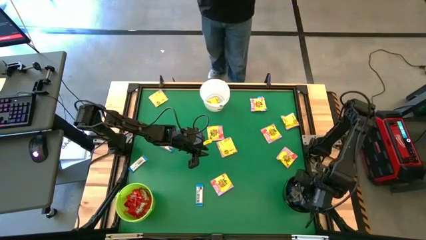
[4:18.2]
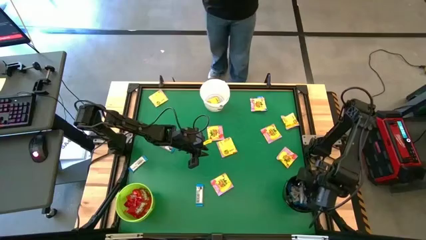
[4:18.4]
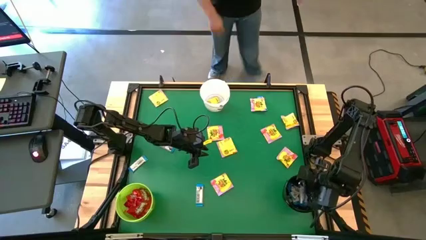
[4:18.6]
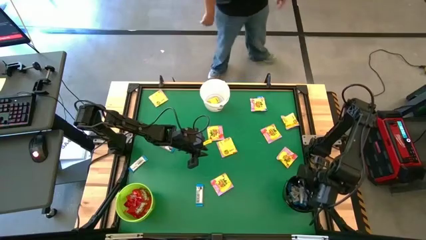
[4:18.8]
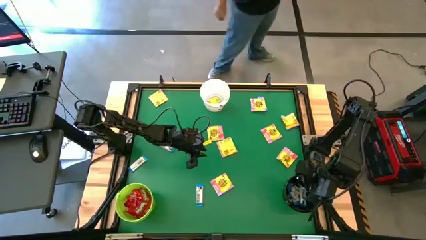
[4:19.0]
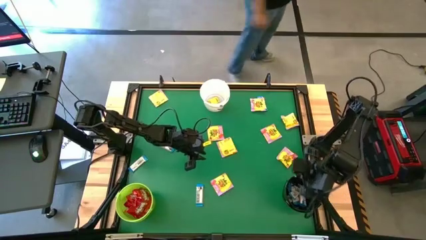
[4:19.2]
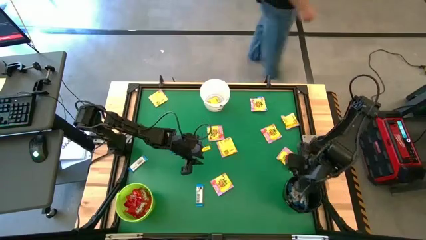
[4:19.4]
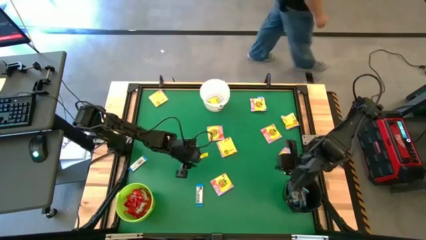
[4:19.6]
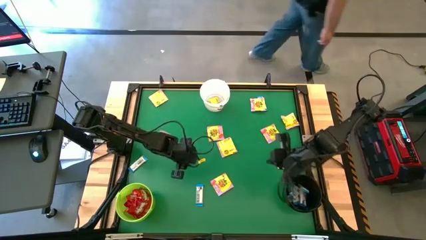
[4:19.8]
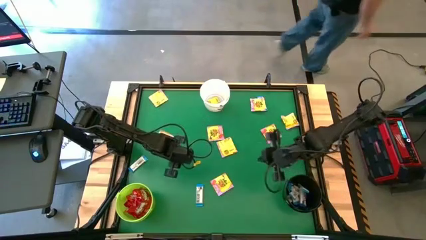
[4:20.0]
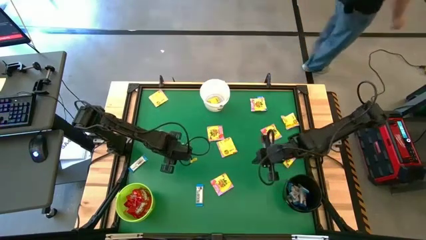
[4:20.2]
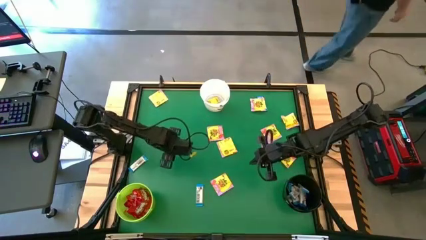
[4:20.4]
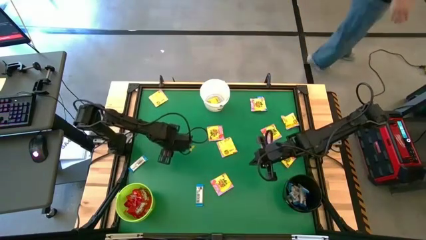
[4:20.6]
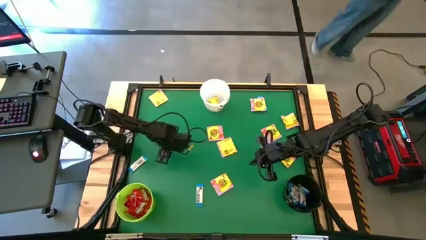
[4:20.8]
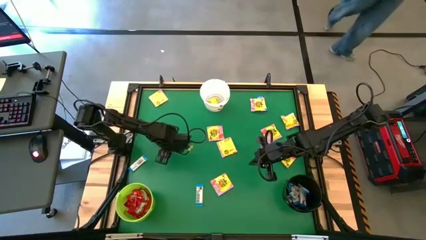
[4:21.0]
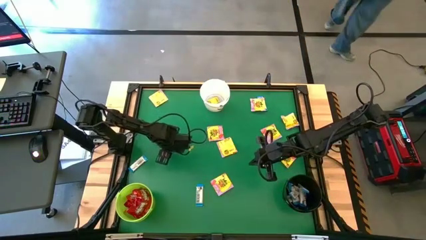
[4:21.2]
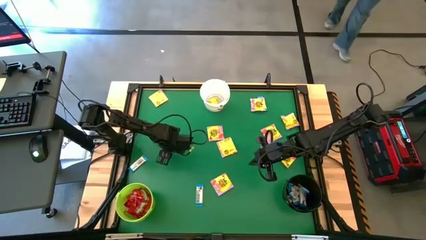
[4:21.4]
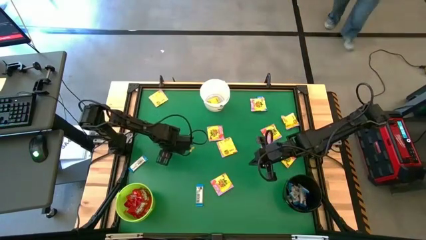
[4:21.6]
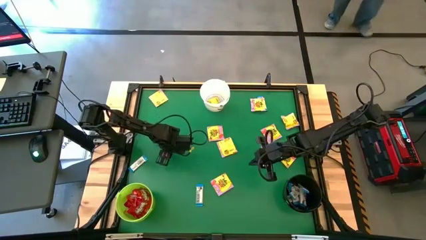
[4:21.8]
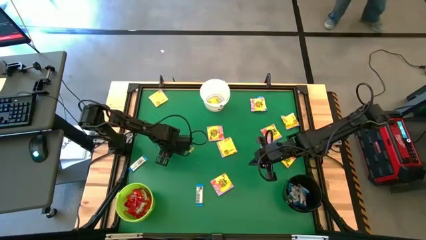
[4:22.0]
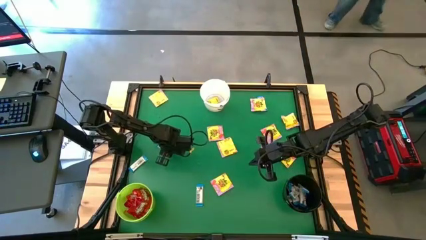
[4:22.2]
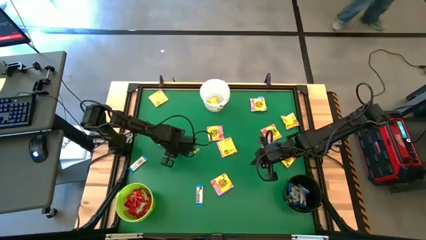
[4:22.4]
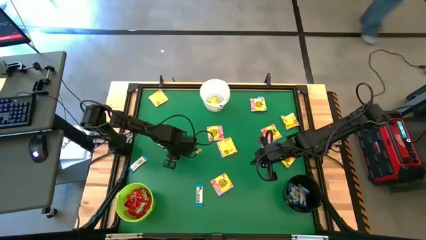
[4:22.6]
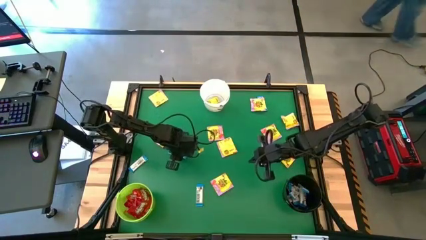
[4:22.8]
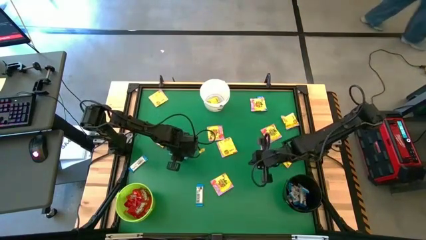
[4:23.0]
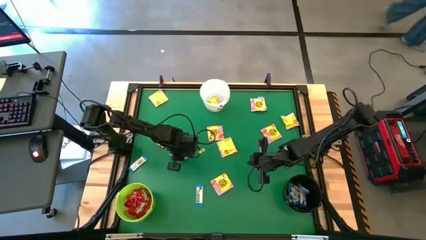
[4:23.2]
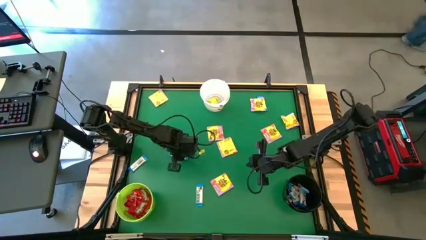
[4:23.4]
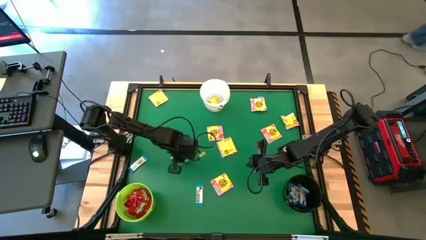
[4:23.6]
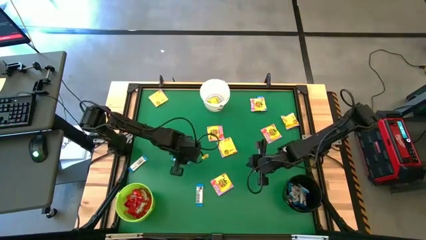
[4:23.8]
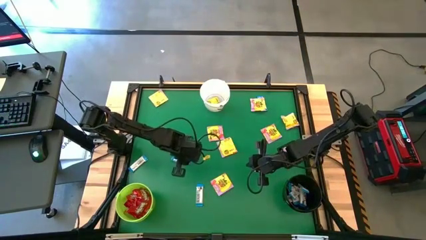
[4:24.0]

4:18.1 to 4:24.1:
Task: Sort candy by brand, put in halloween buckets
Put the white candy into the black bucket

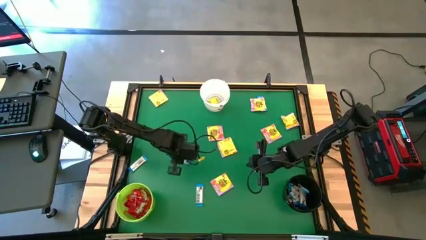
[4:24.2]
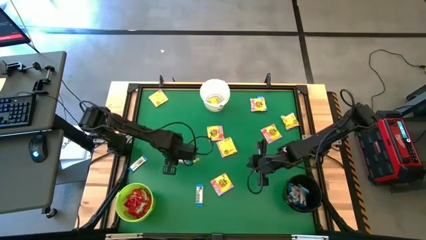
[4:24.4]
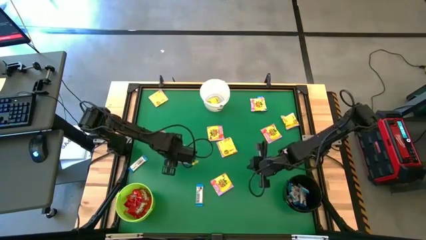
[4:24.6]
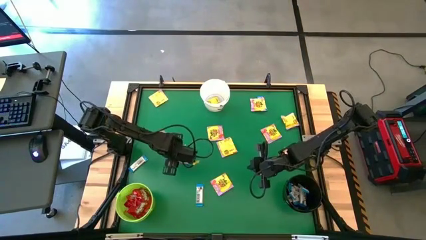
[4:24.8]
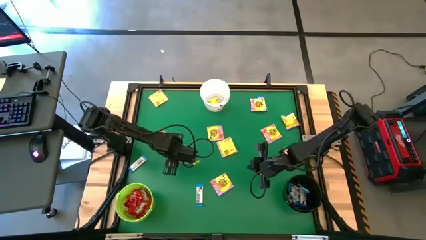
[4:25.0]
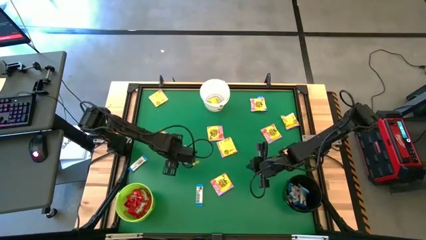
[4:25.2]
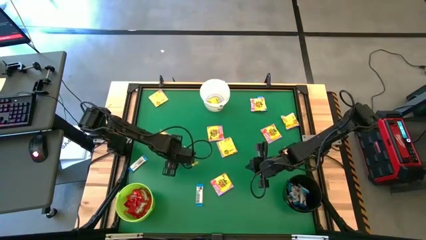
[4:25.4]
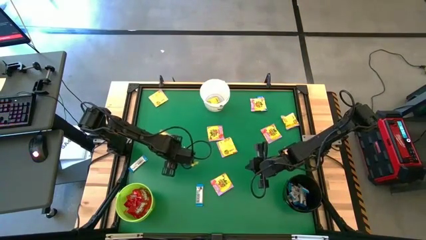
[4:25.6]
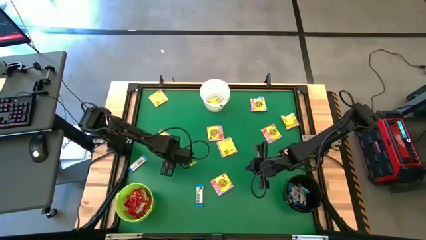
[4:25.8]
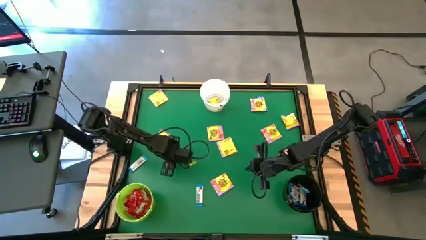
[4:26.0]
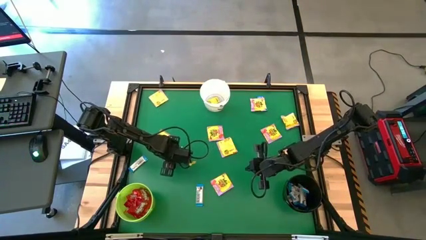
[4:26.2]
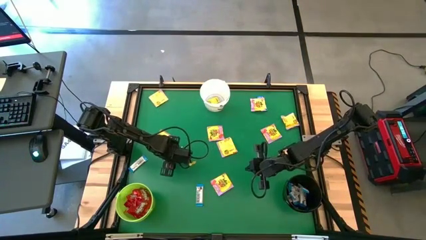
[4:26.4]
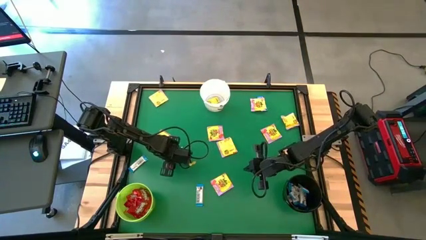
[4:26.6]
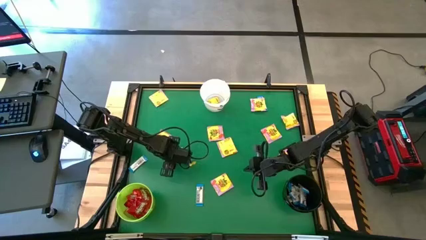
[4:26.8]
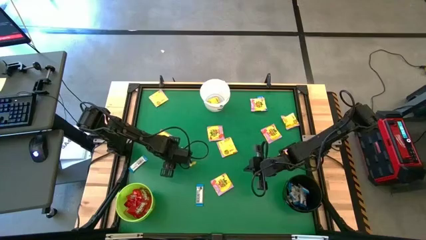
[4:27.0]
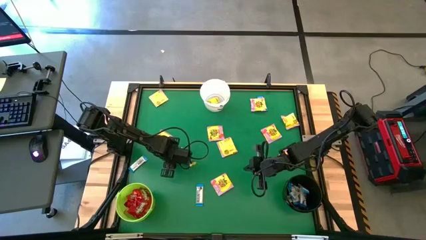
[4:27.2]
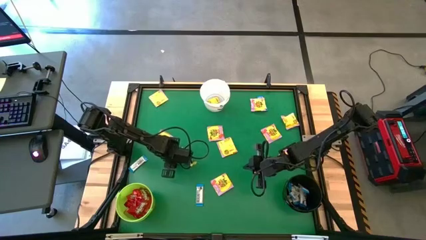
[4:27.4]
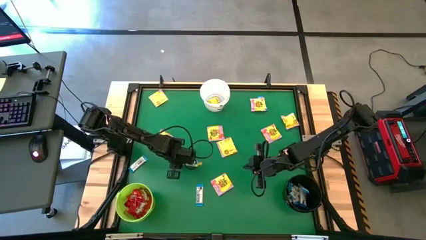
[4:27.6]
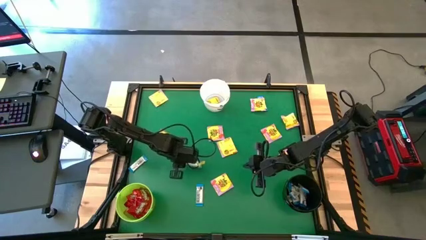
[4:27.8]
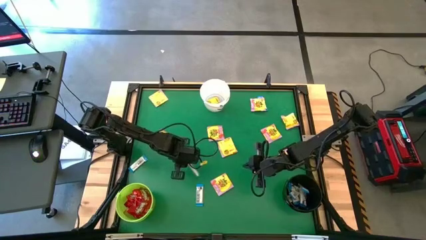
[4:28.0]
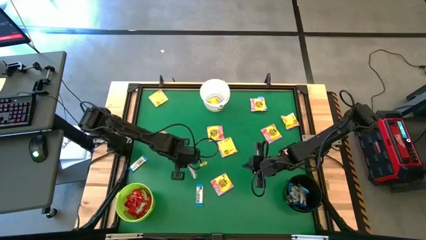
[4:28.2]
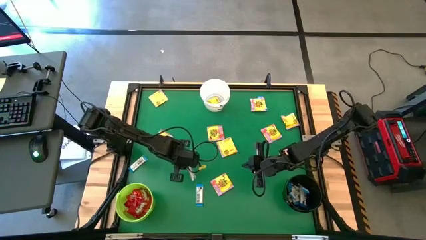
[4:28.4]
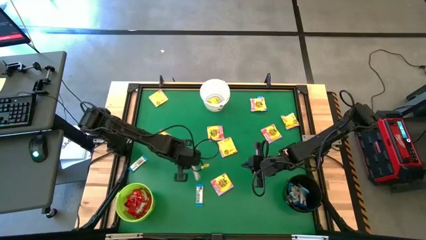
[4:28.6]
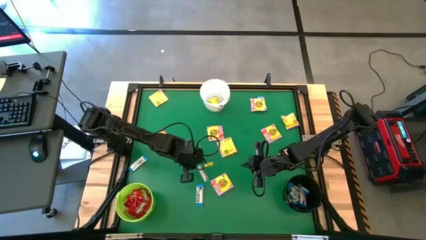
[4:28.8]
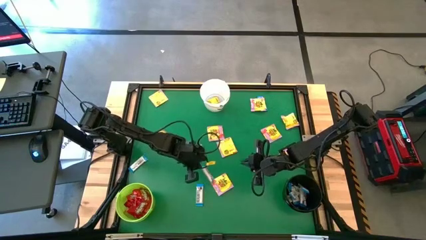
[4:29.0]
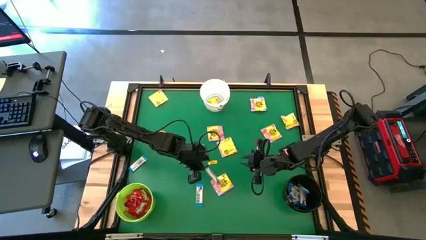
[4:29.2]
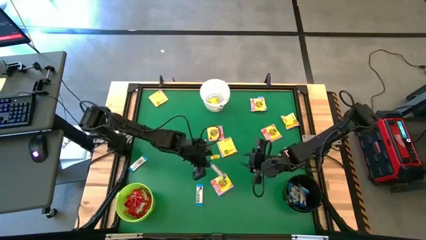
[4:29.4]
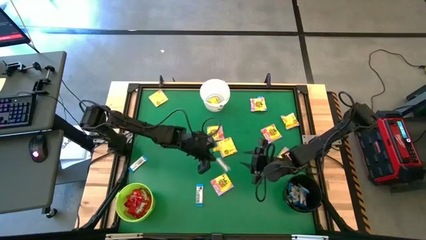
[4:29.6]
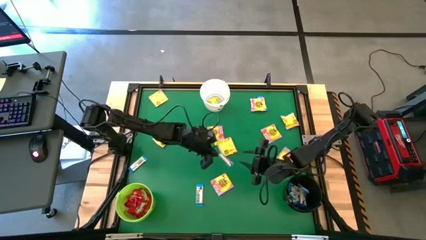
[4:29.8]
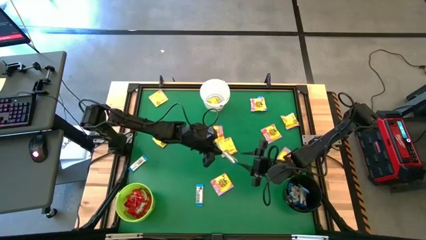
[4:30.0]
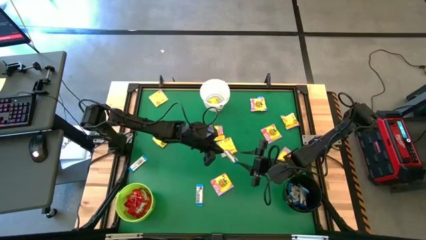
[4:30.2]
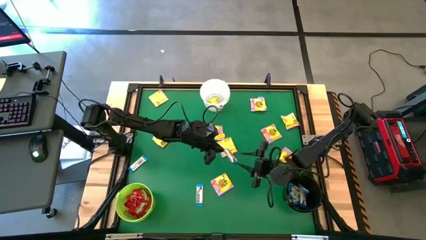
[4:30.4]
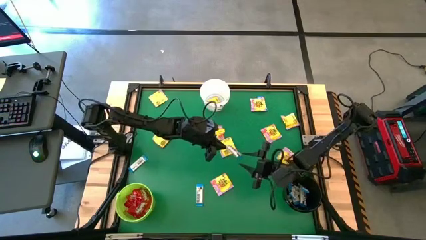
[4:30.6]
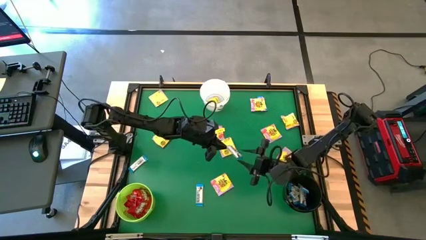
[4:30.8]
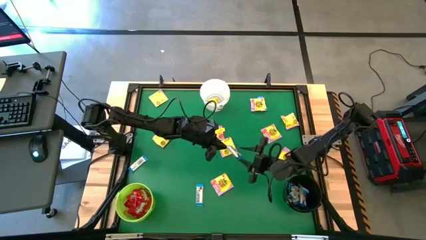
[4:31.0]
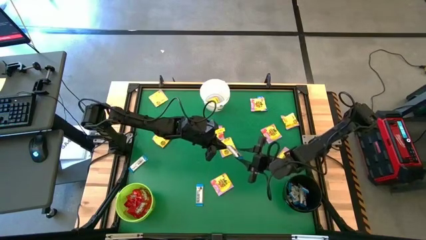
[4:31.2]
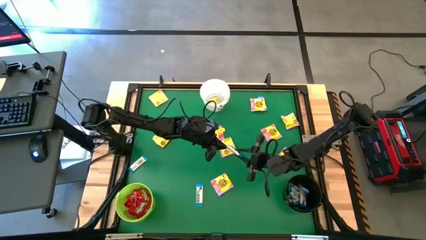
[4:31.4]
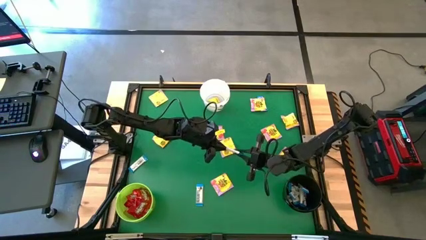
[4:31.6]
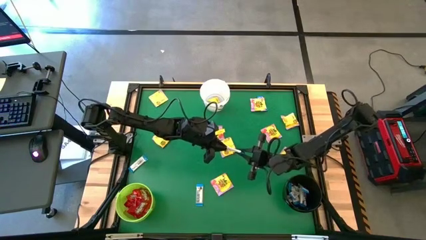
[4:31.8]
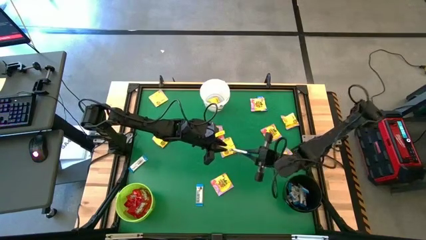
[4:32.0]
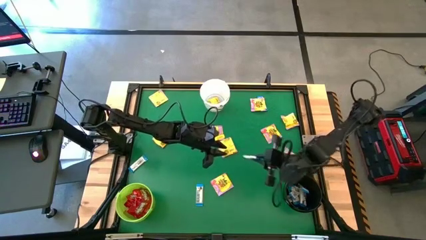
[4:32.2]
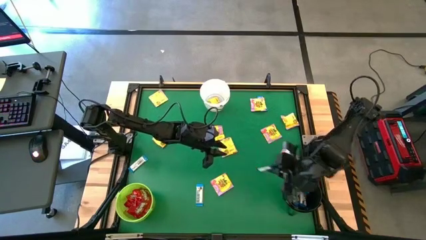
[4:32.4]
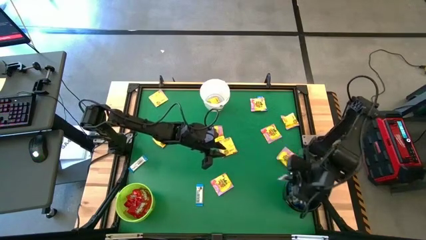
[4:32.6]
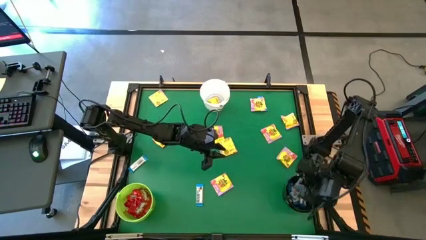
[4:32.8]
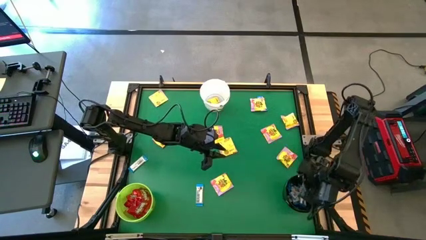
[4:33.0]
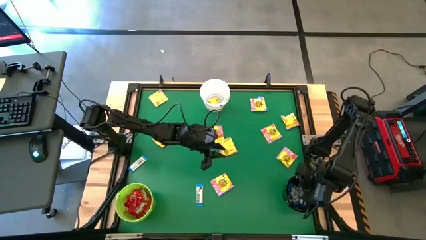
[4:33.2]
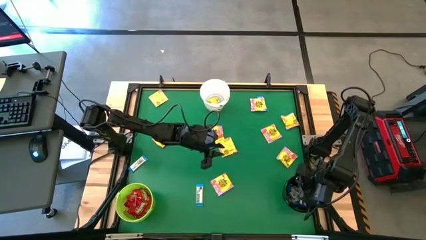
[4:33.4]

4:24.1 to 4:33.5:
Put the white candy into the black bucket

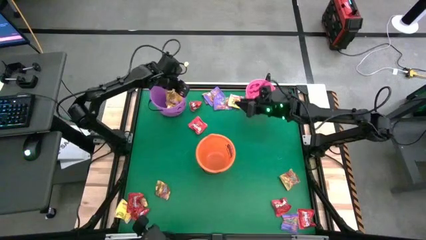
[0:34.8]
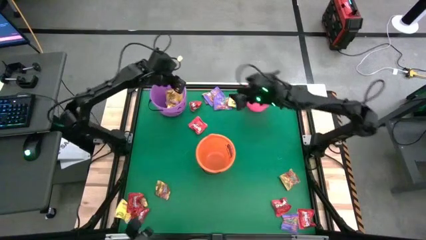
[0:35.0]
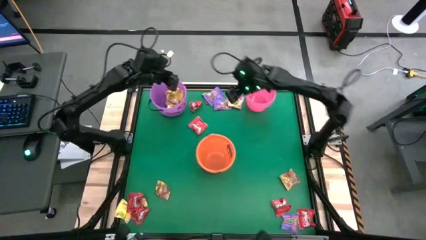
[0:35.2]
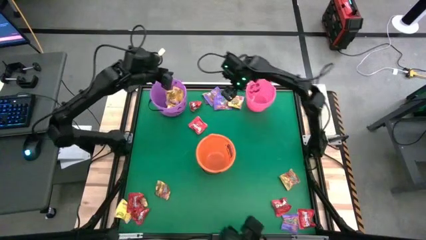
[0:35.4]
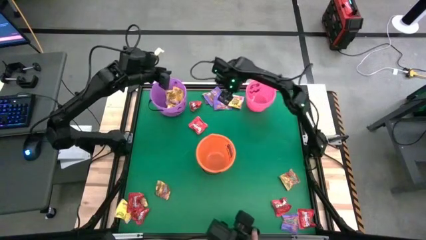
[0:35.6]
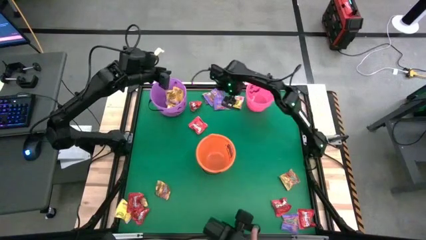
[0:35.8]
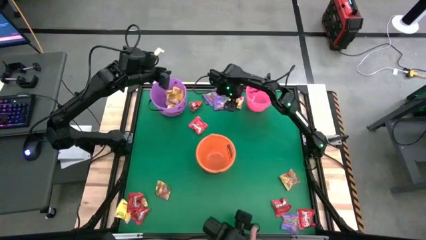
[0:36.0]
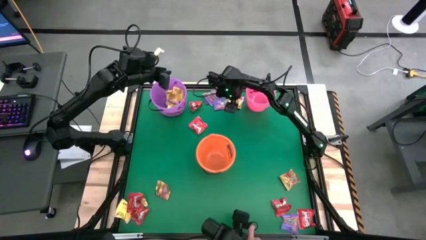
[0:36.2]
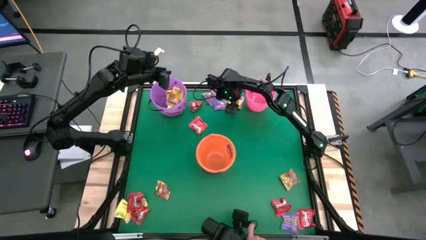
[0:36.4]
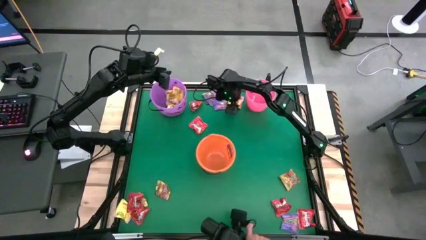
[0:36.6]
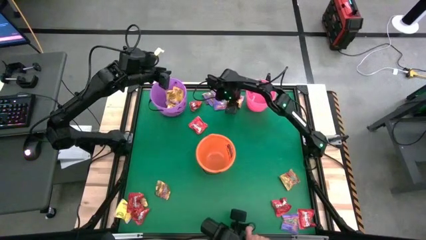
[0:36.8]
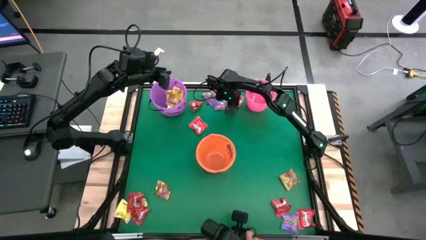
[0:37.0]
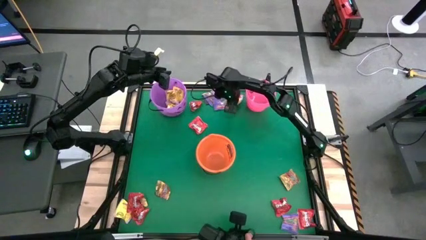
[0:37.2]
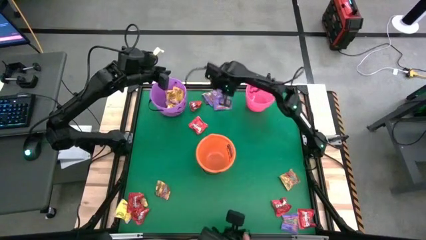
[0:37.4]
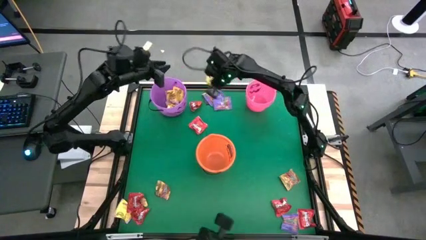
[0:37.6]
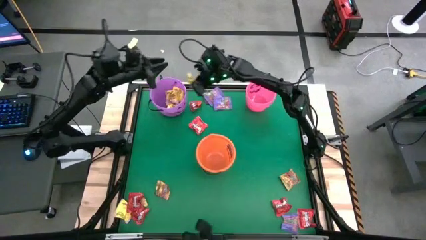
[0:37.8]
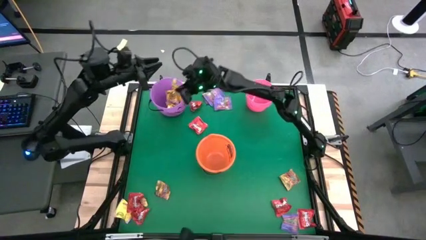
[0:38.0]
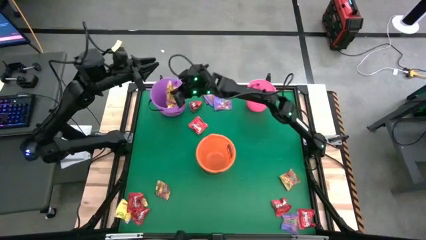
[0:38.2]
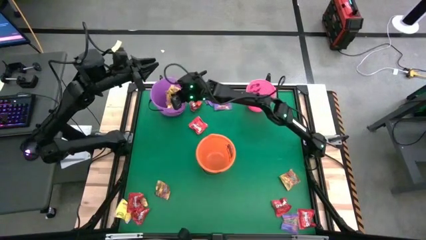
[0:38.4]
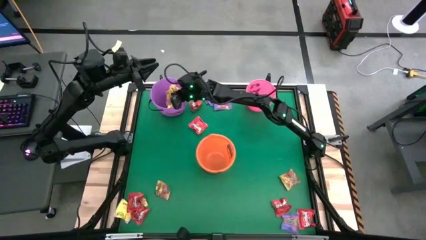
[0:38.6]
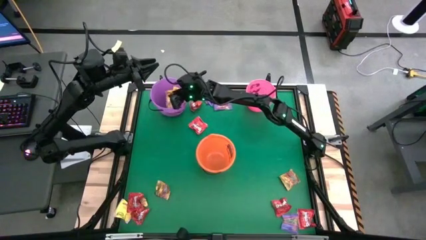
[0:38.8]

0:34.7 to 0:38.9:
Task: Sort candy by brand, put in halloween buckets
Put the yellow candy into the light violet bucket
